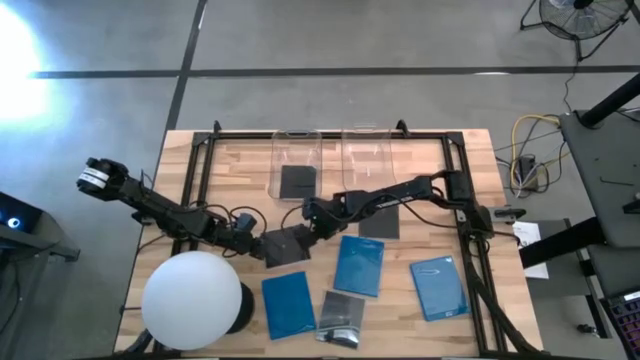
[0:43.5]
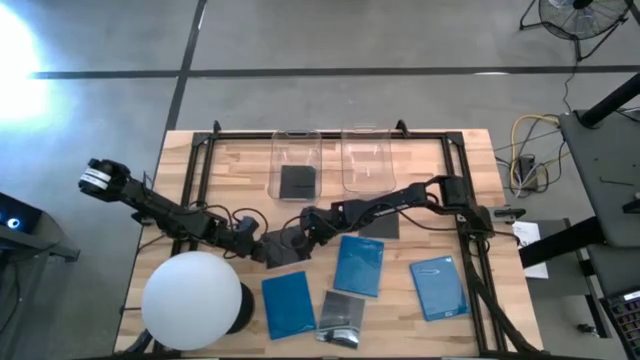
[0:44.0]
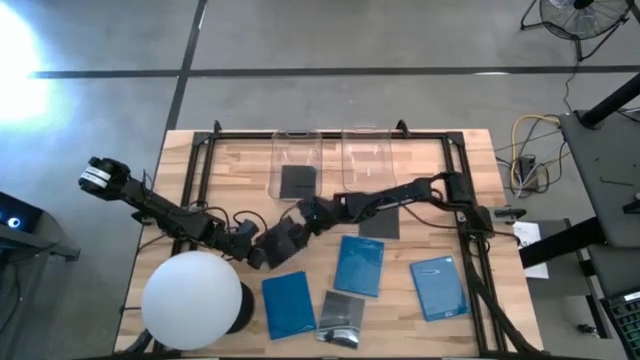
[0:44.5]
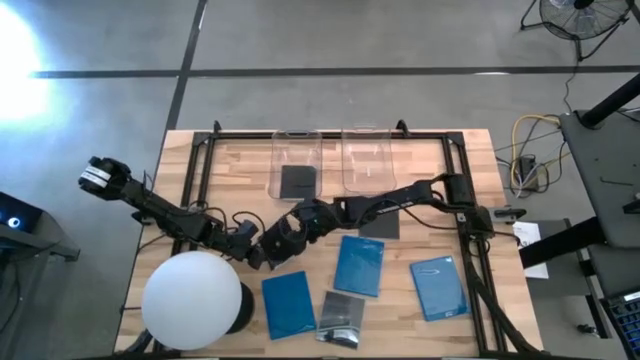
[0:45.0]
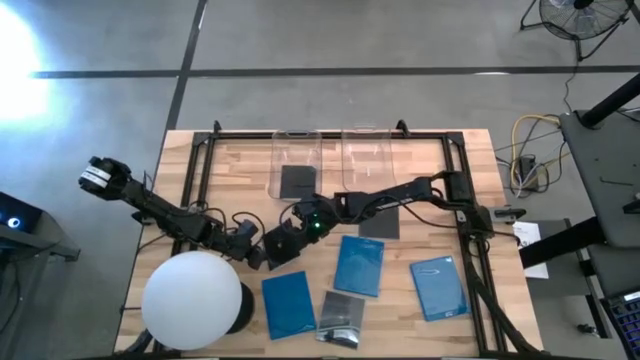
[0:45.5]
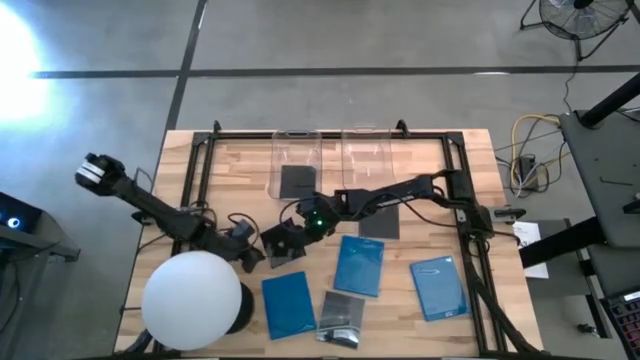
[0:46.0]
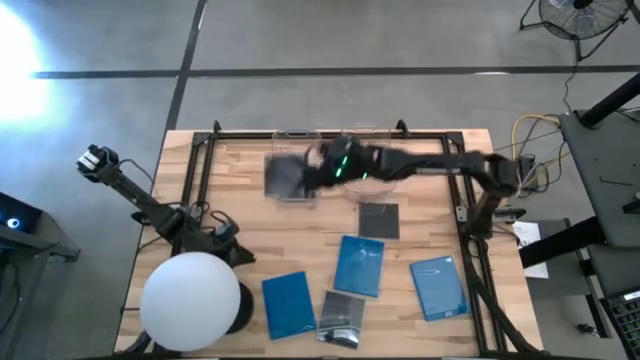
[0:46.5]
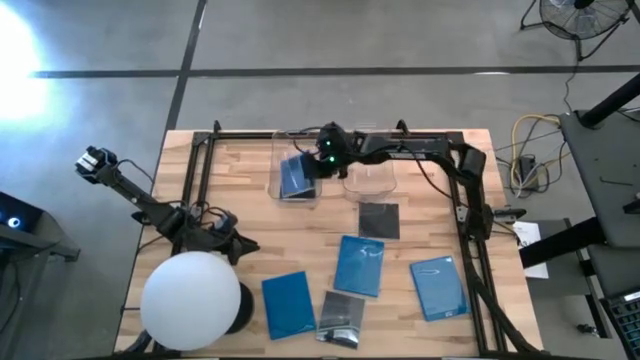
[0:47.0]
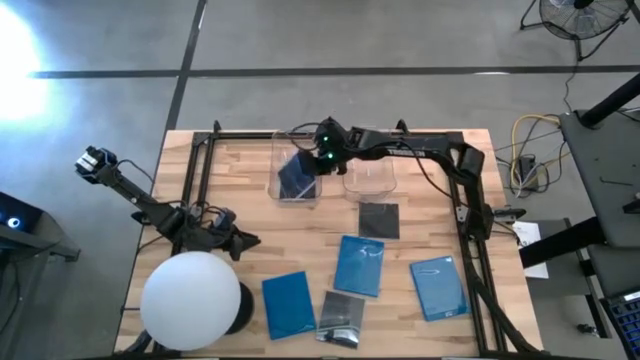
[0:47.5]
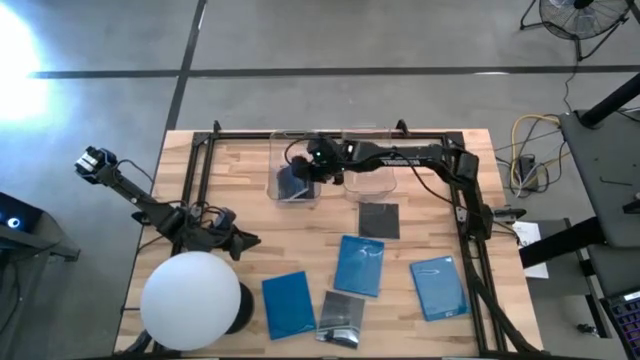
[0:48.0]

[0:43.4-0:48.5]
Task: Pick & place jewel cases by type
Put the black cd case into the left transparent bin

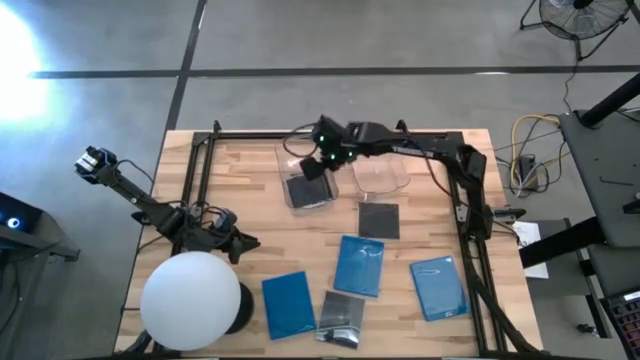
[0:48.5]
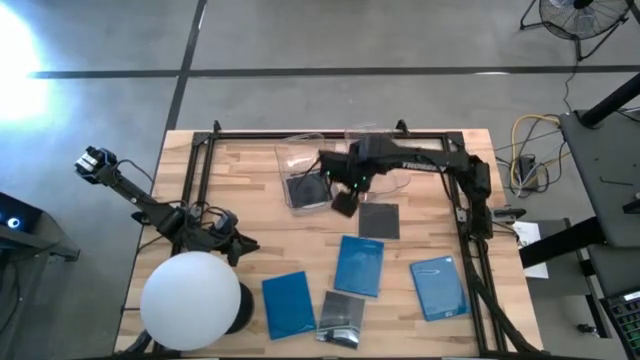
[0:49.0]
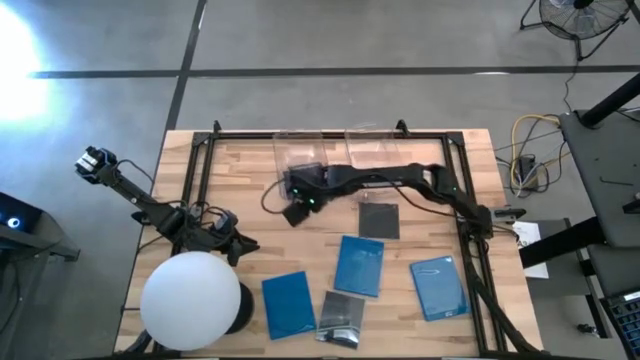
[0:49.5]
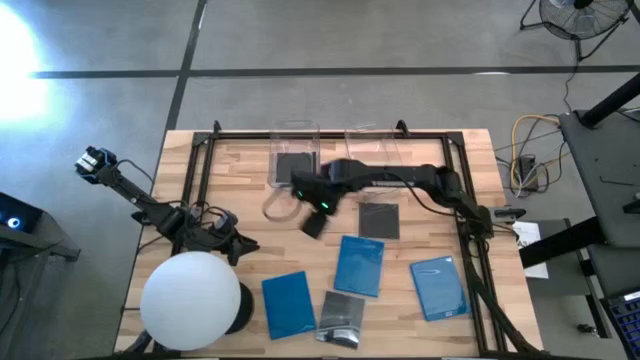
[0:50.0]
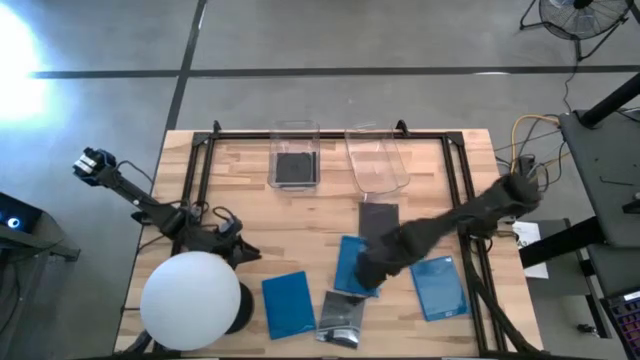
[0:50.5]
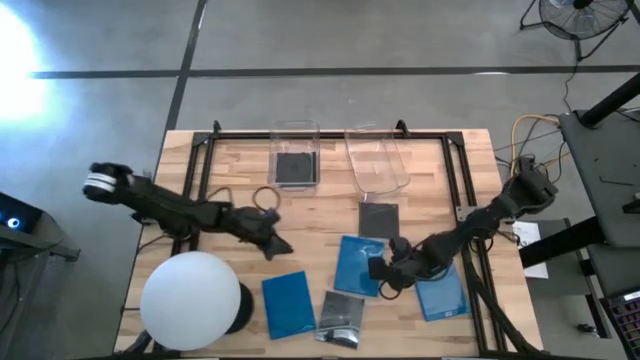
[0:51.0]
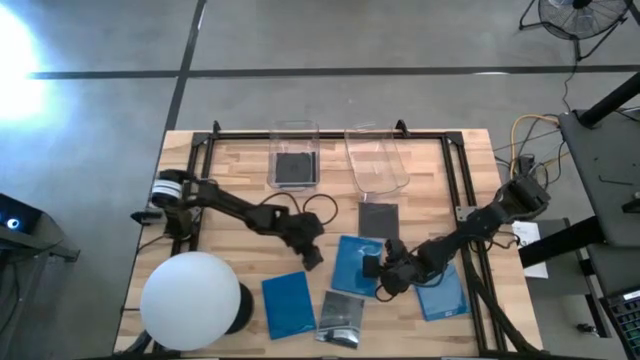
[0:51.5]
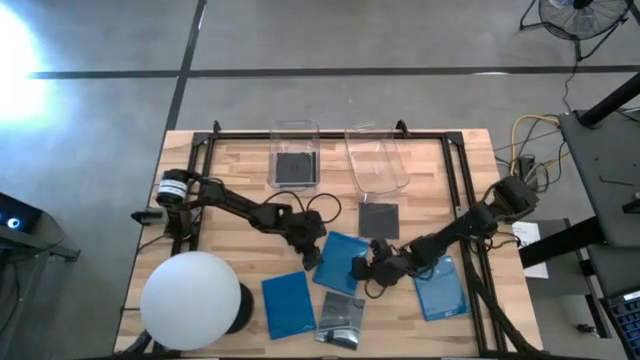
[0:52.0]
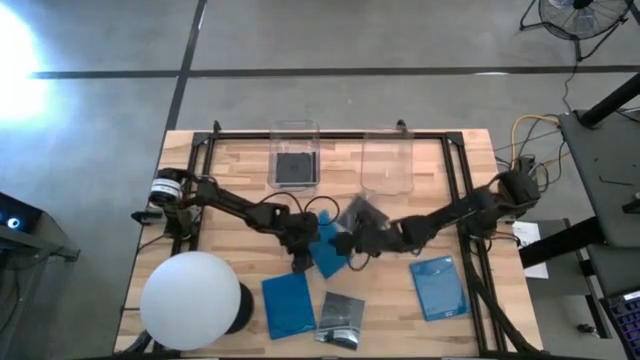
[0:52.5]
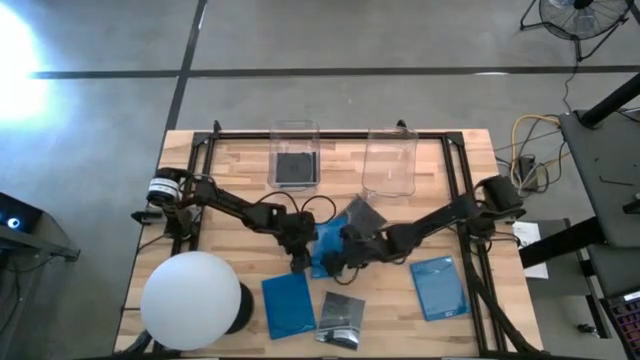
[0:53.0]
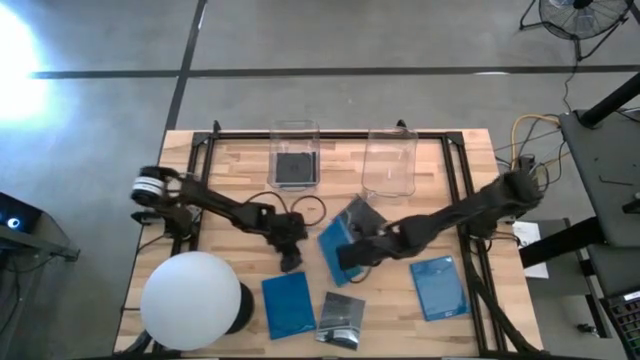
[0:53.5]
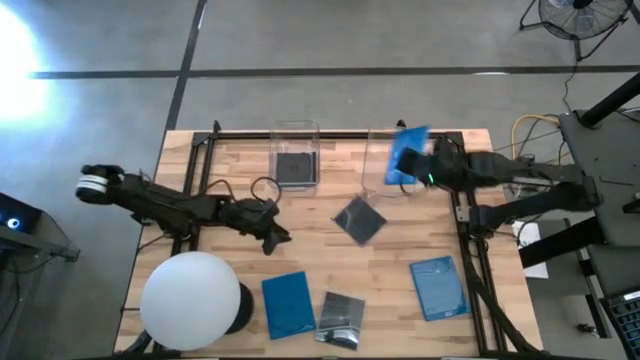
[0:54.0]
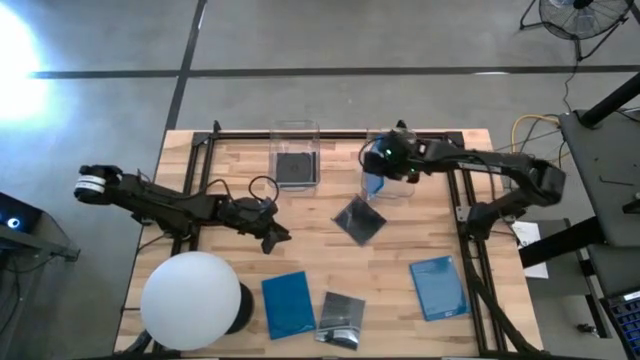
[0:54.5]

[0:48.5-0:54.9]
Put the blue cd case into the right transparent bin

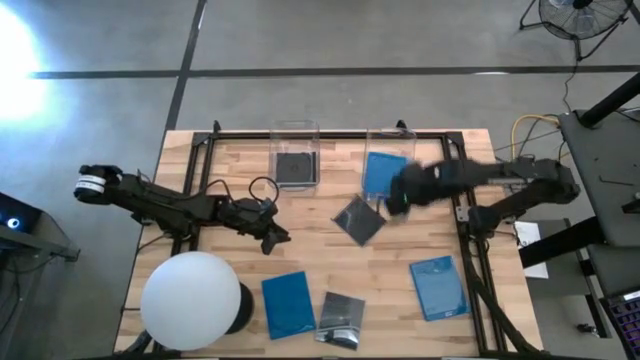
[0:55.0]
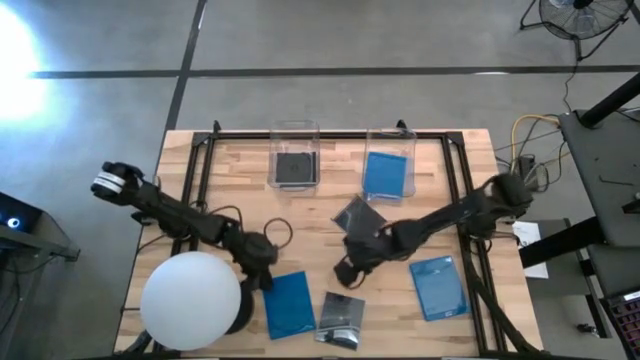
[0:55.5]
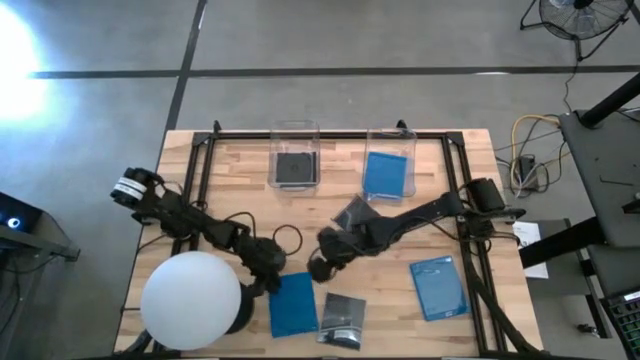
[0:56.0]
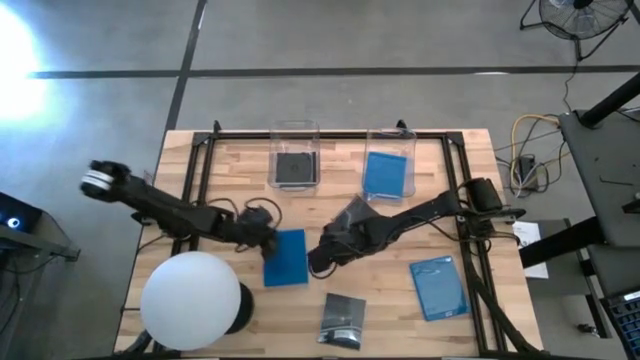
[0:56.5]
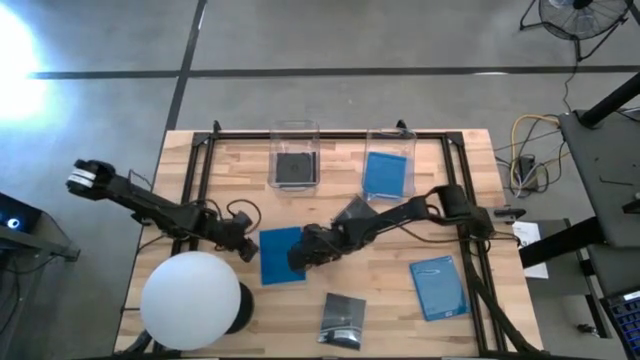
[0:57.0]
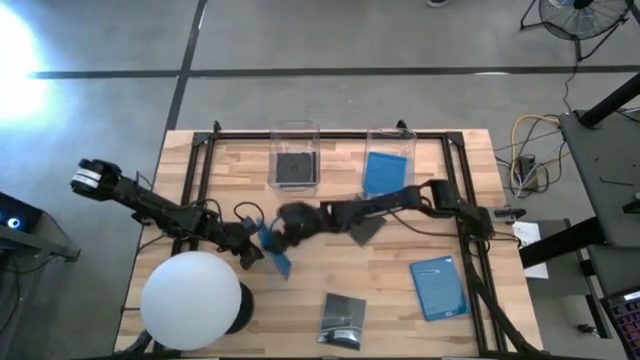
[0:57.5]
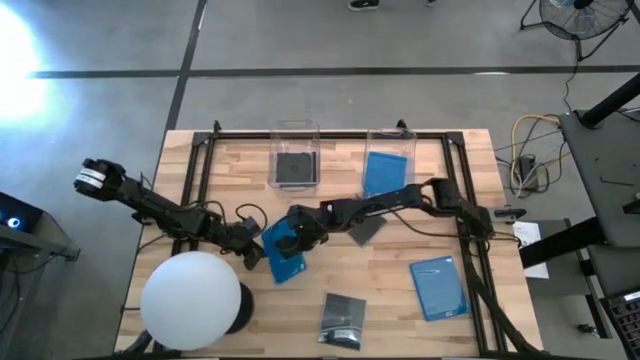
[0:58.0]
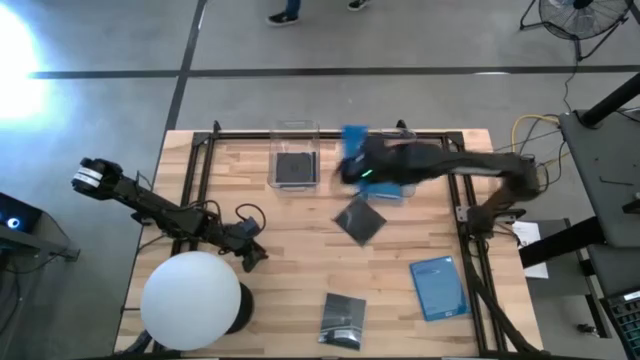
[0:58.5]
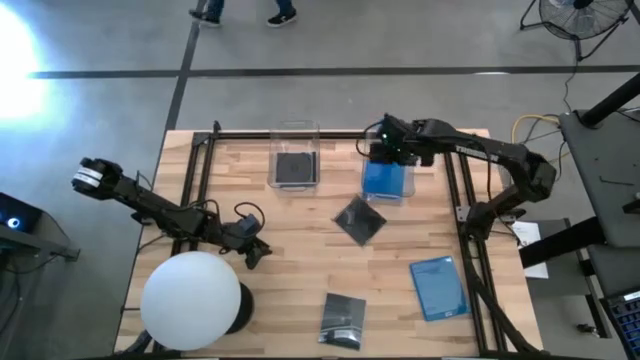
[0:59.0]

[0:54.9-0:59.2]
Stack the blue CD case into the right transparent bin

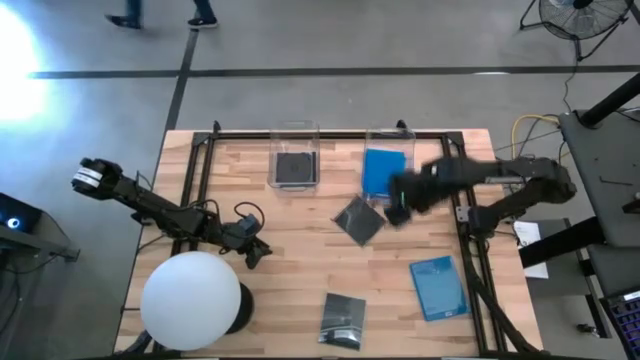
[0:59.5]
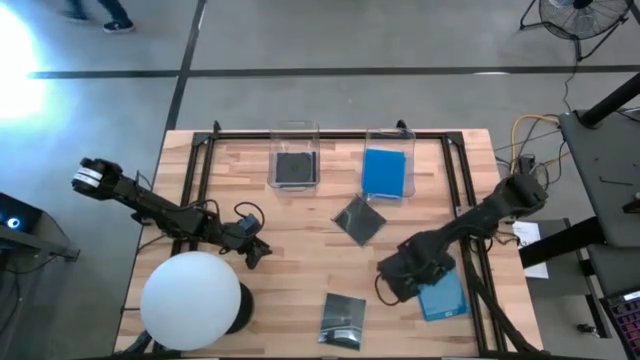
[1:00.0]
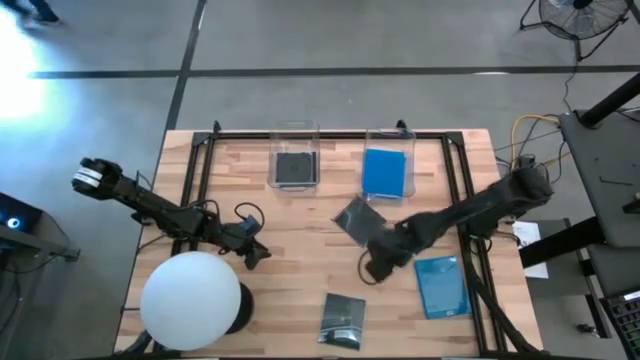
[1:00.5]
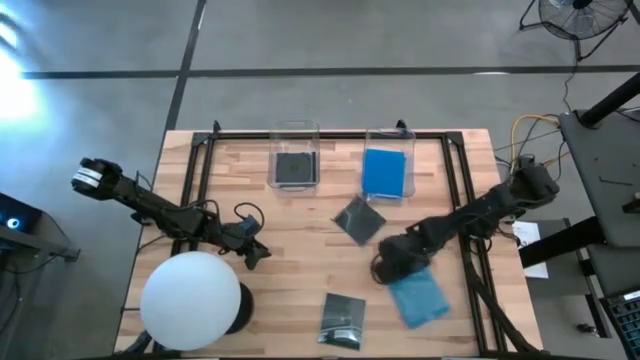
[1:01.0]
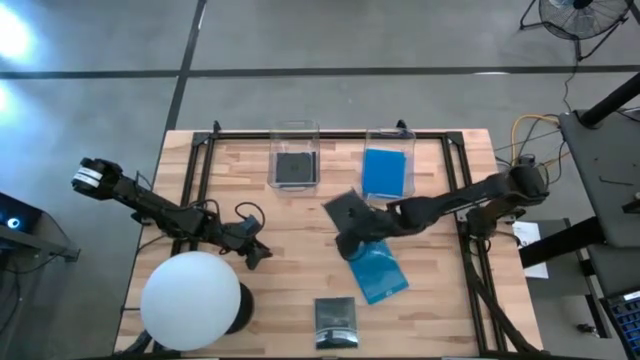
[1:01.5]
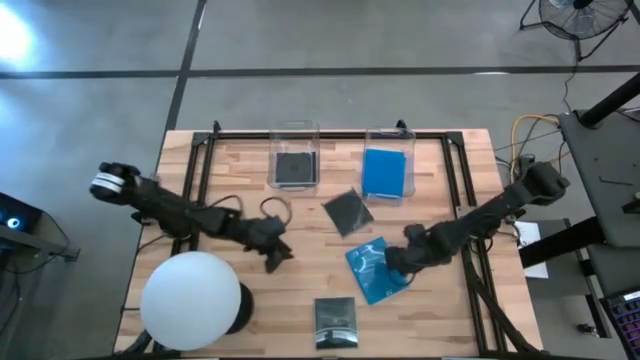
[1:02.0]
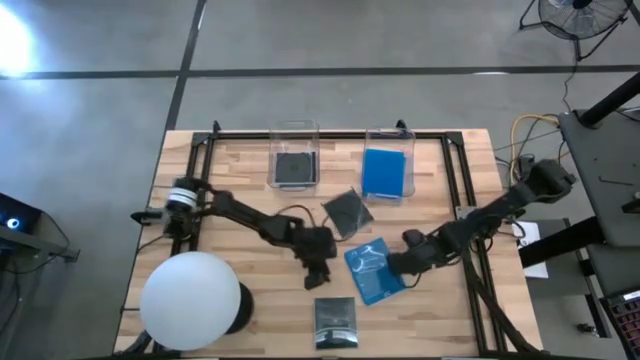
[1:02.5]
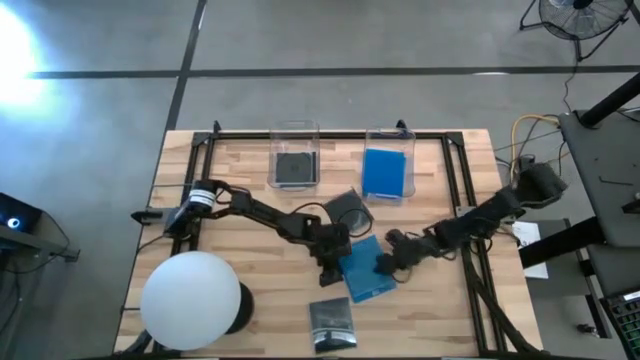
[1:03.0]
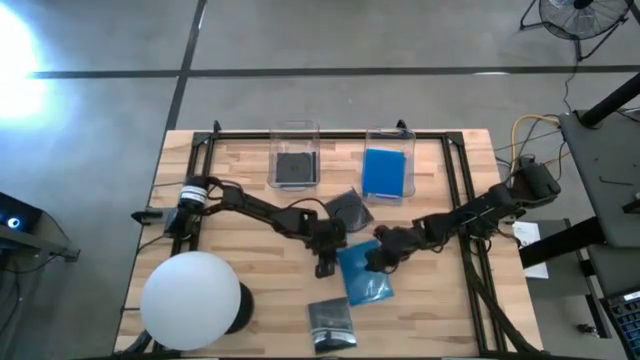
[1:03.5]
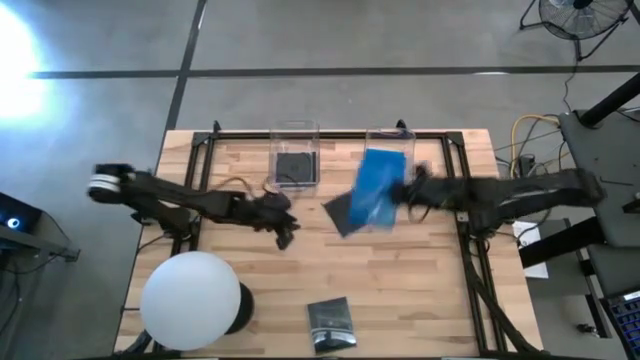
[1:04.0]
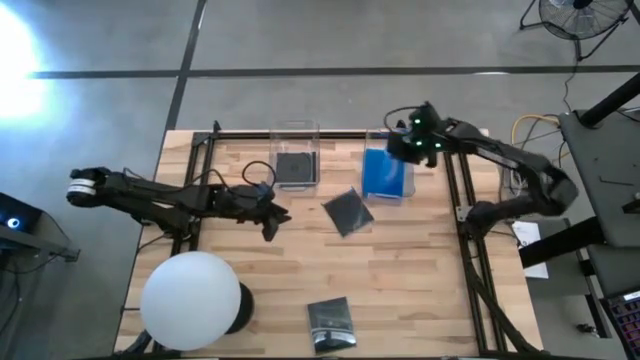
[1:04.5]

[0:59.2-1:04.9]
Stack the blue CD case into the right transparent bin
